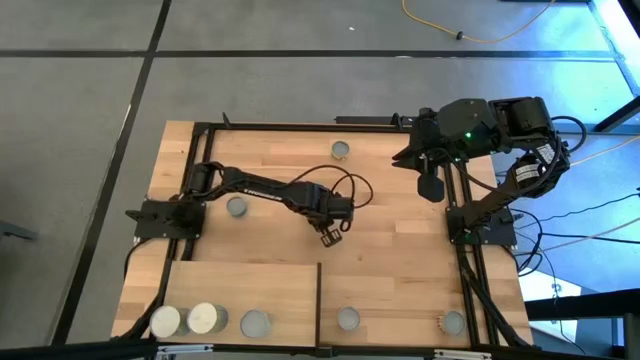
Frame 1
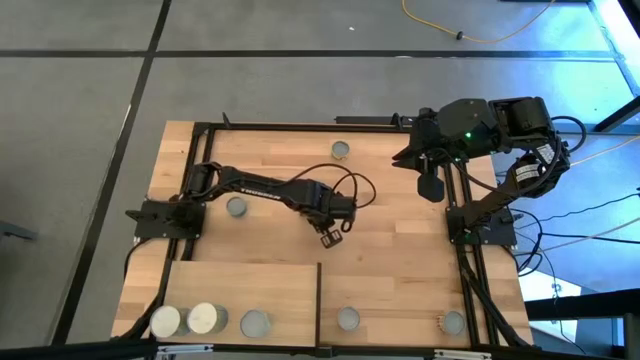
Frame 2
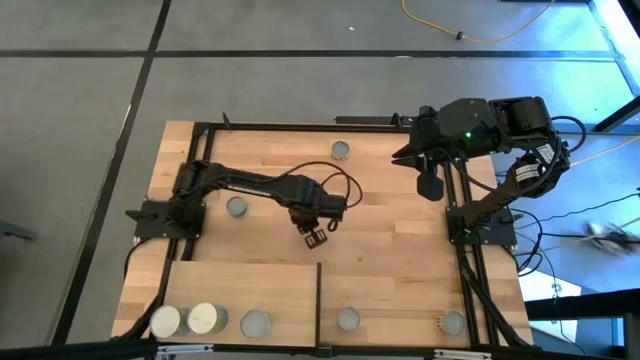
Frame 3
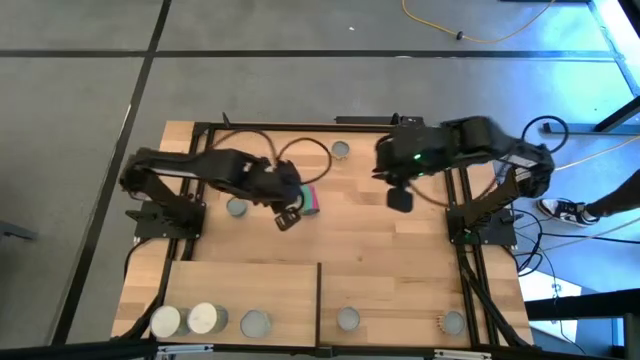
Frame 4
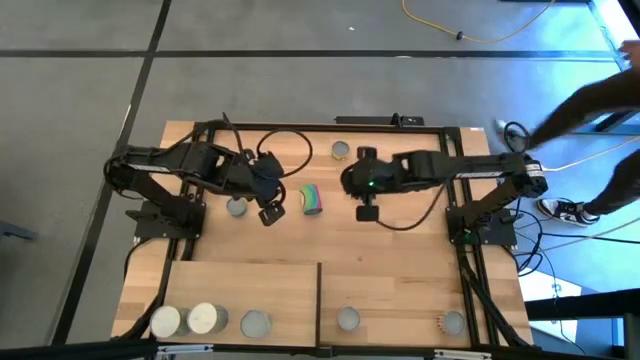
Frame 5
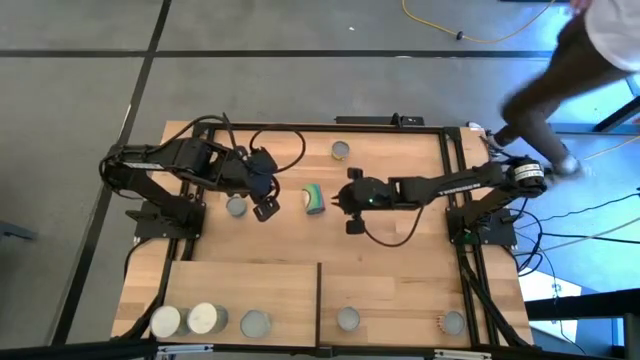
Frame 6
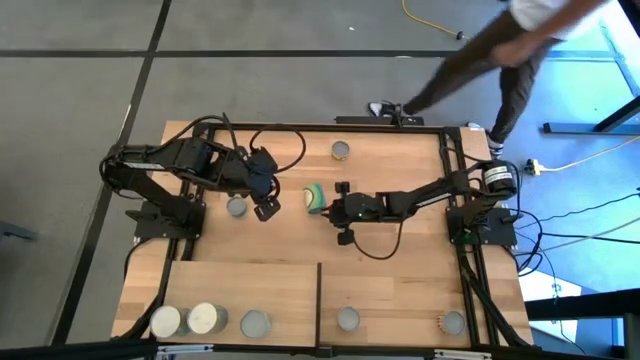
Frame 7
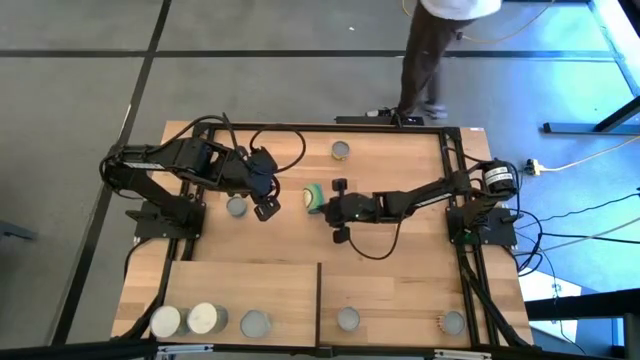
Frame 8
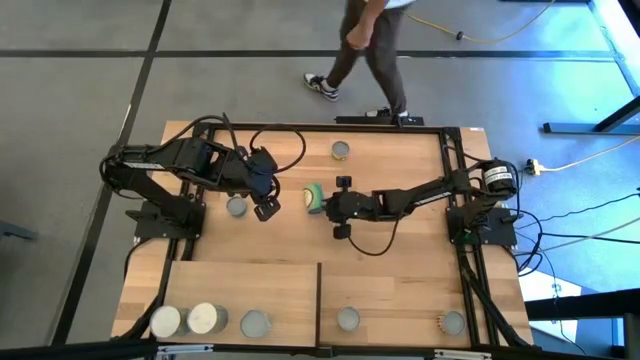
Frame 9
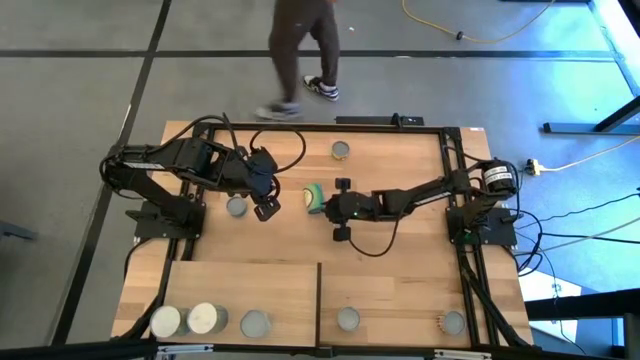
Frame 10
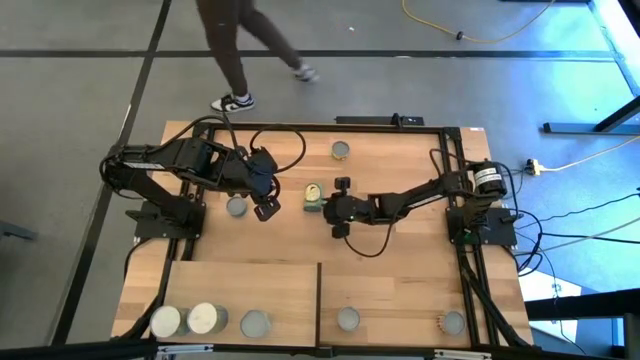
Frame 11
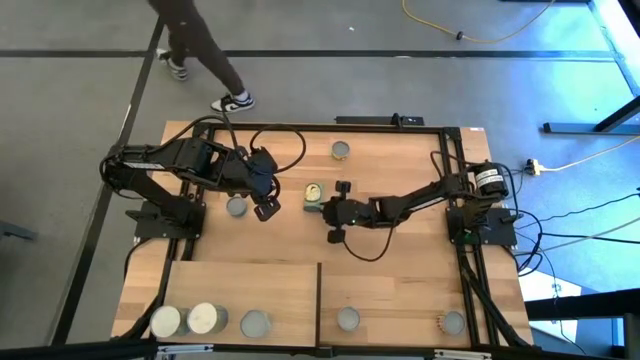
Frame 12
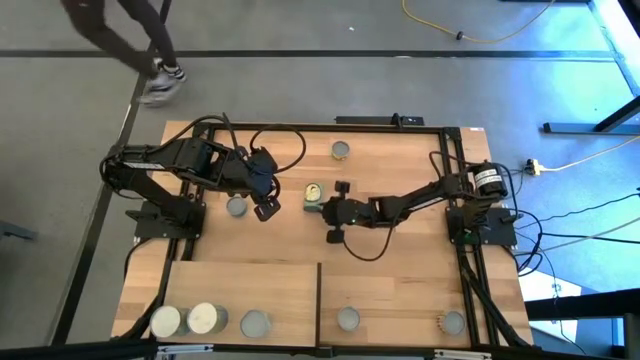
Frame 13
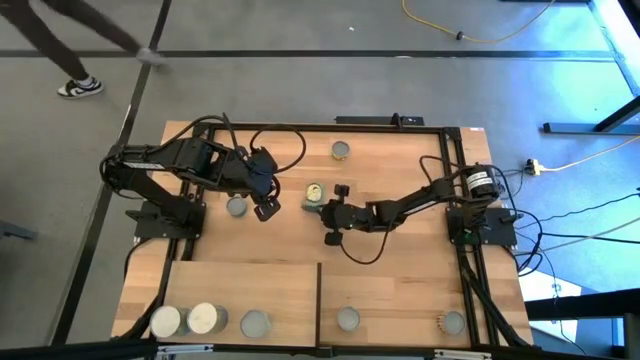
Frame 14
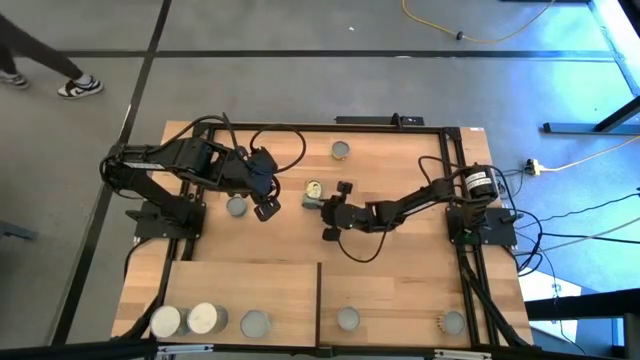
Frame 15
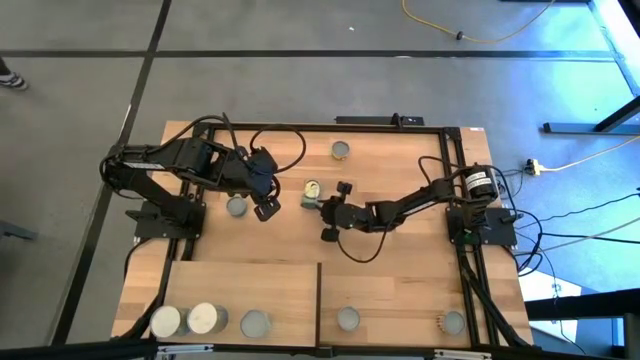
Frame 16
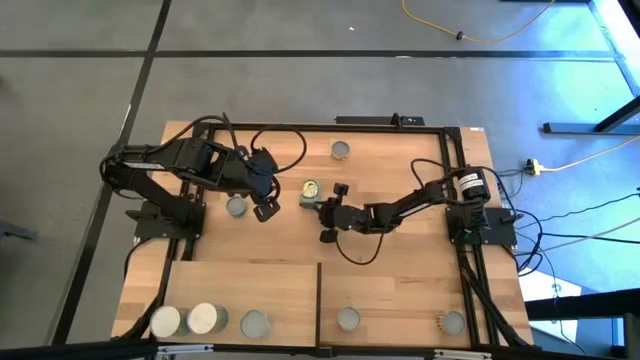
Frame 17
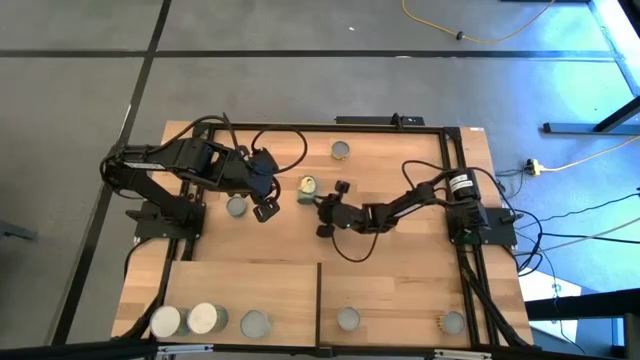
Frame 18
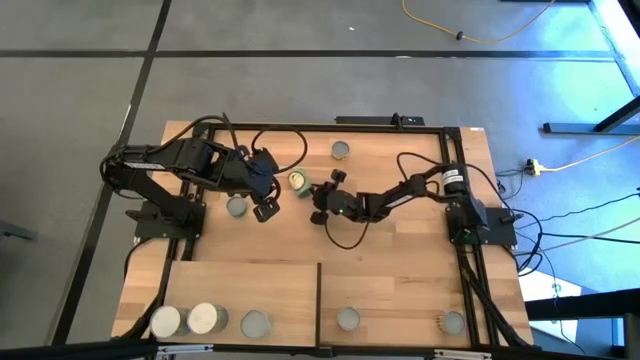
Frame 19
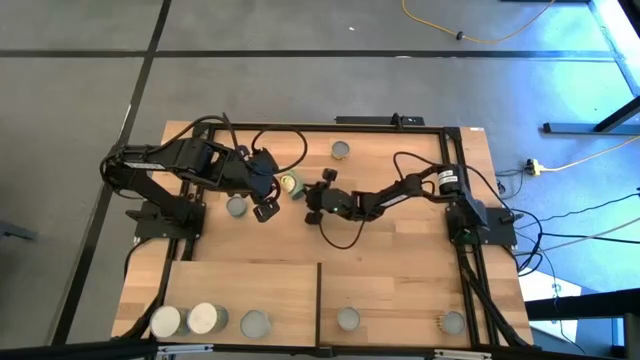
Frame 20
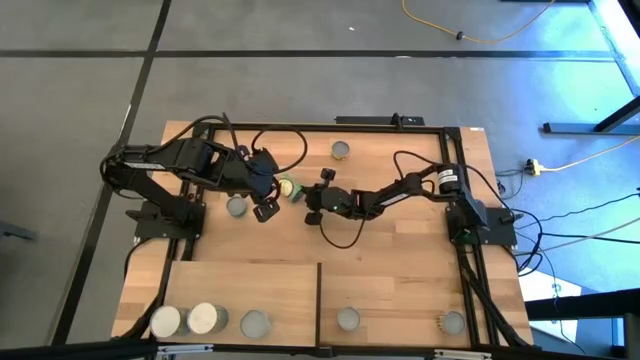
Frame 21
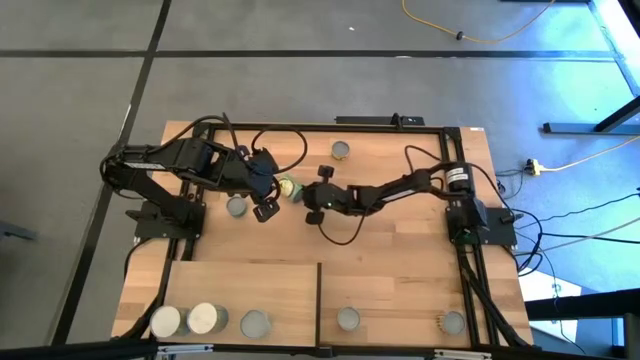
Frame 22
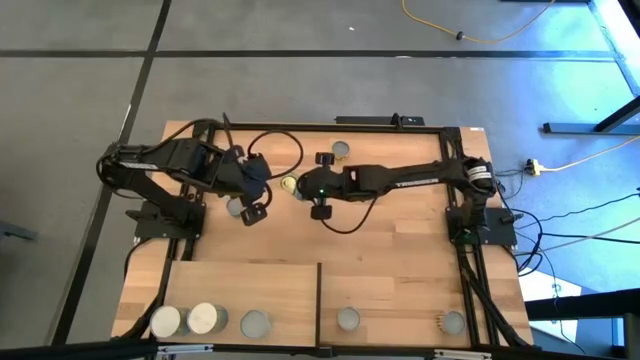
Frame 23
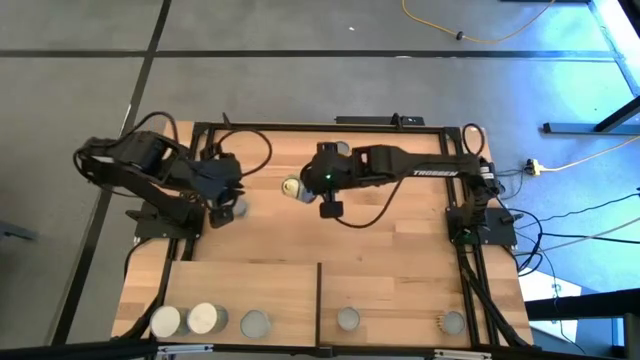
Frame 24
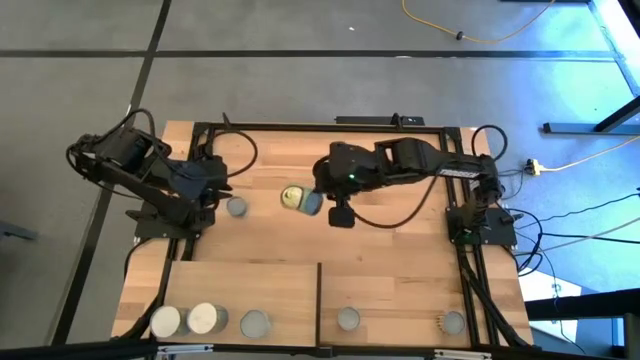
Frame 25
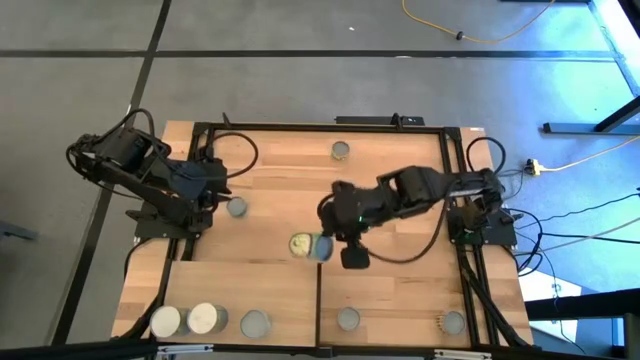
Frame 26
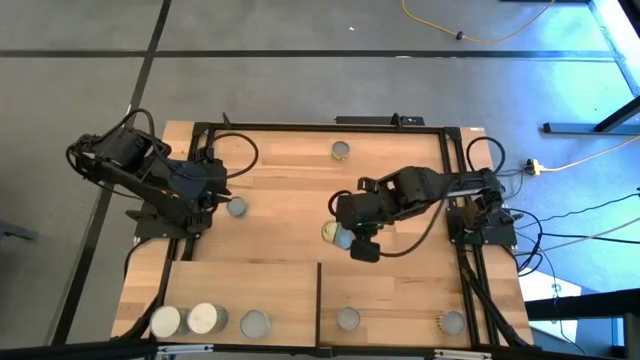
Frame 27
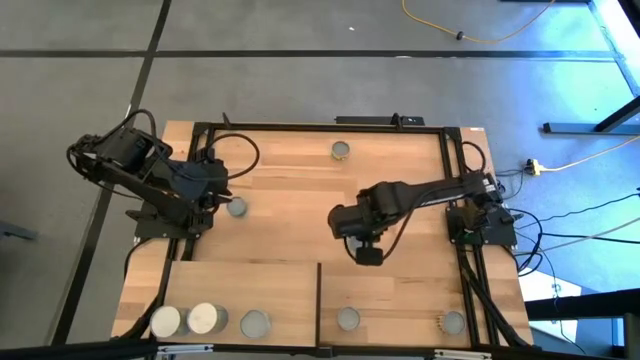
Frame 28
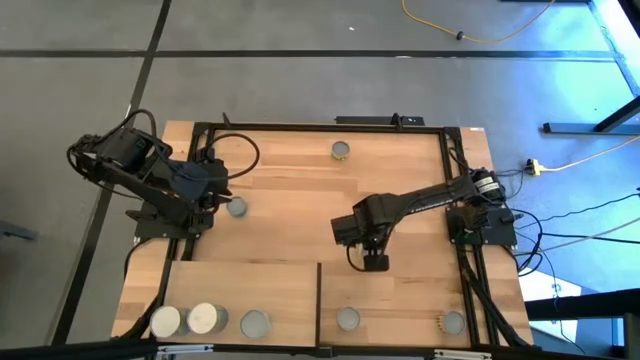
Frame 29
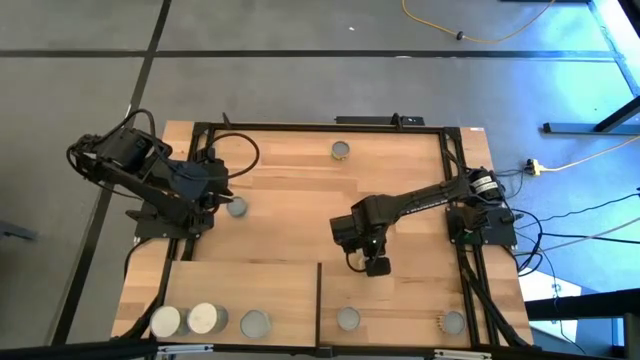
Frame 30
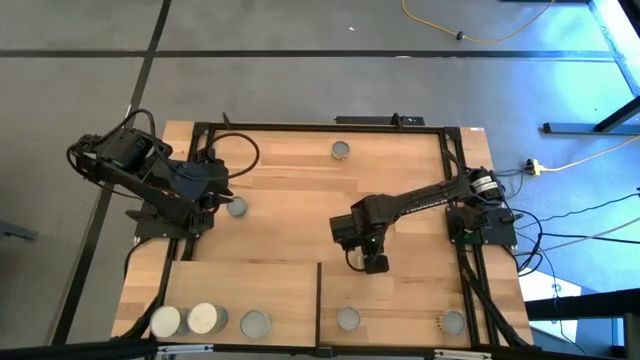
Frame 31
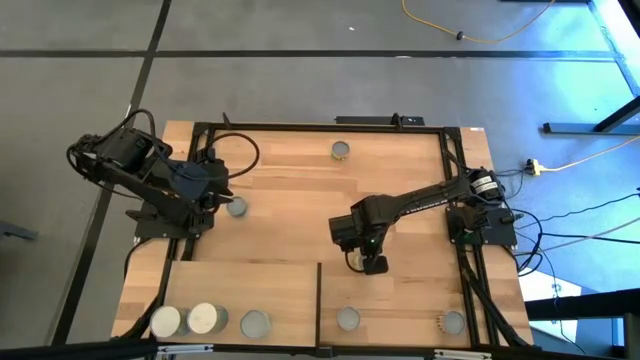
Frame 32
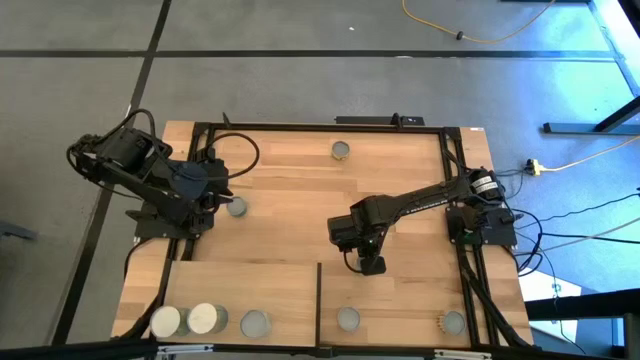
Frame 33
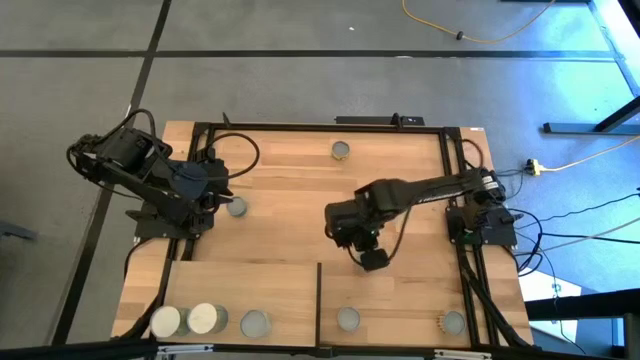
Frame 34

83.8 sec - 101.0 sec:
Task: Pick and place cans onto a shelf
Put the canned chicken soup on the shelf

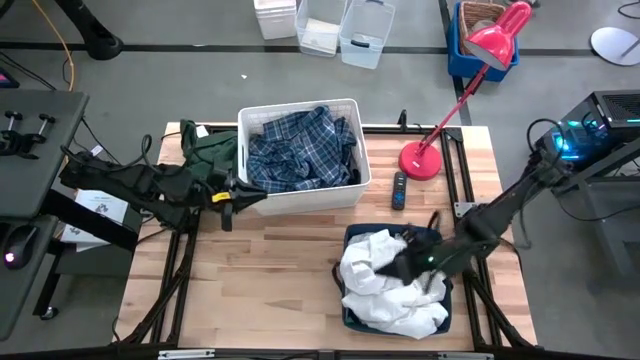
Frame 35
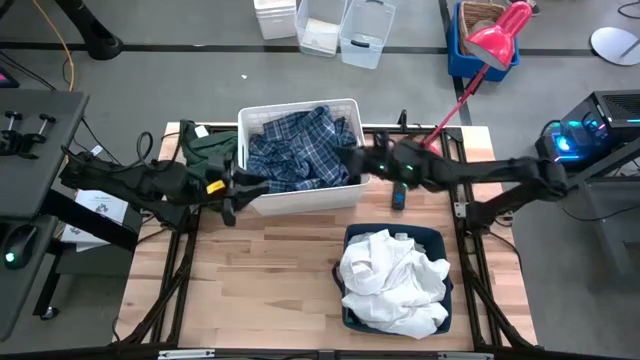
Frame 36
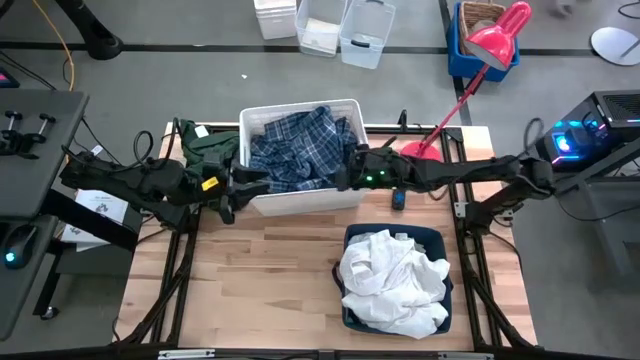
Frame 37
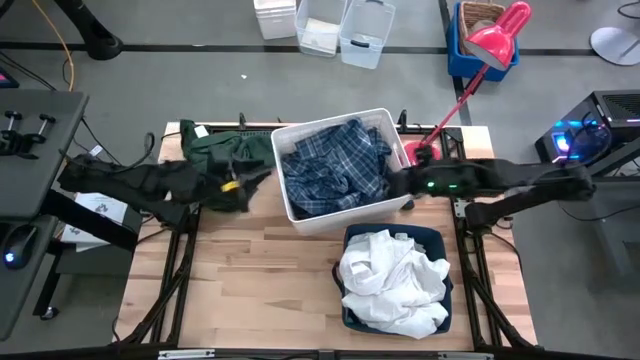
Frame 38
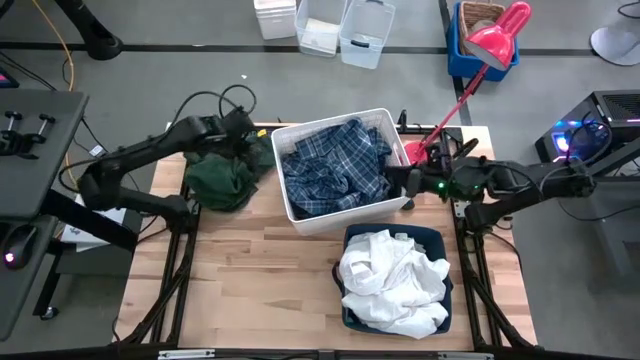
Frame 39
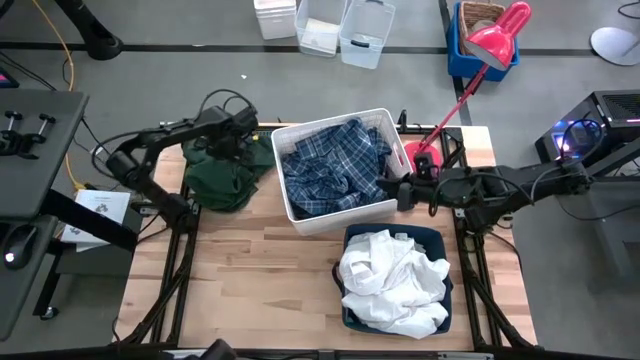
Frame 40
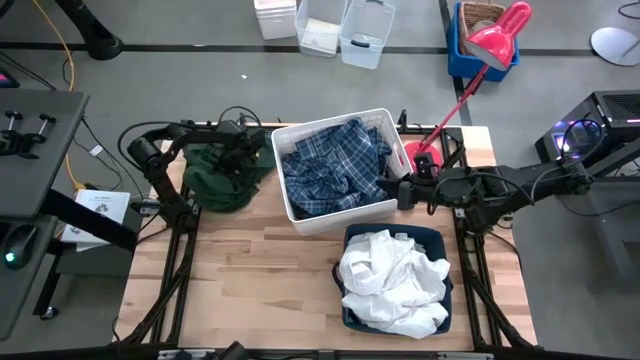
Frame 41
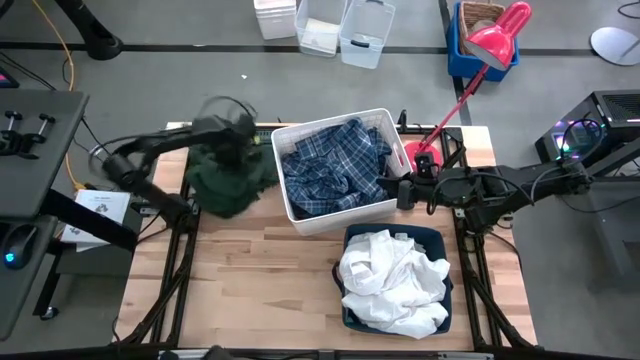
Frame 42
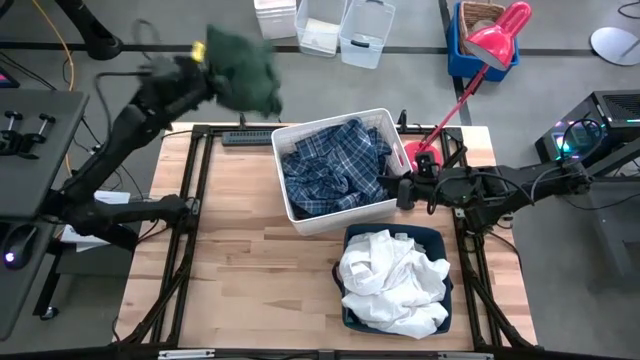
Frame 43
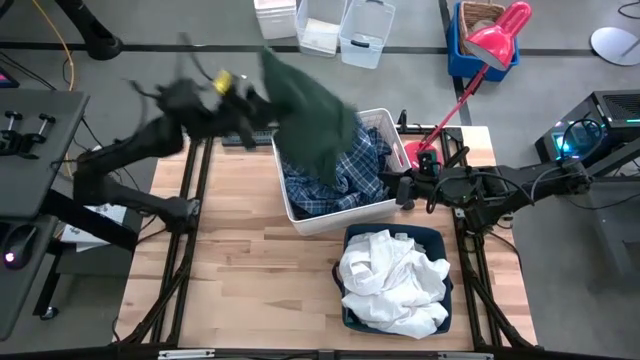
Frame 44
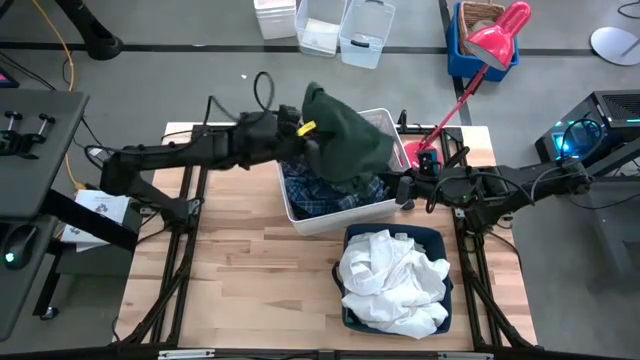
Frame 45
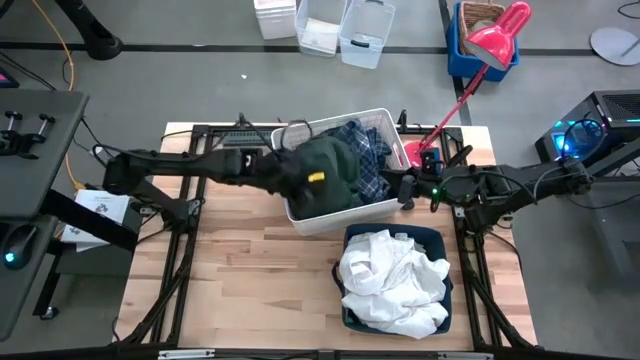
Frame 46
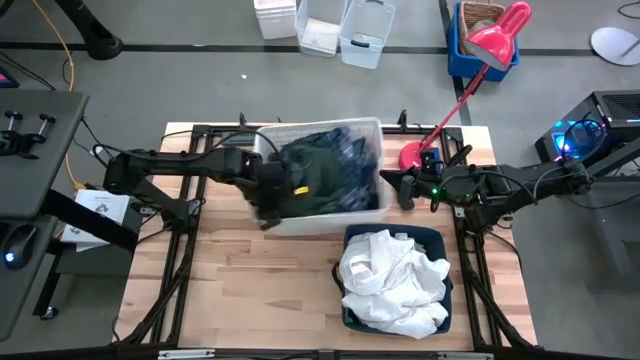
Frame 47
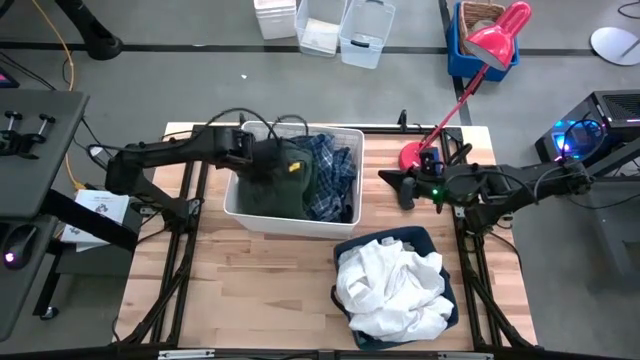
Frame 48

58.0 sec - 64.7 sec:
Task: Sort clothes
Put the green polo into the white laundry bin
